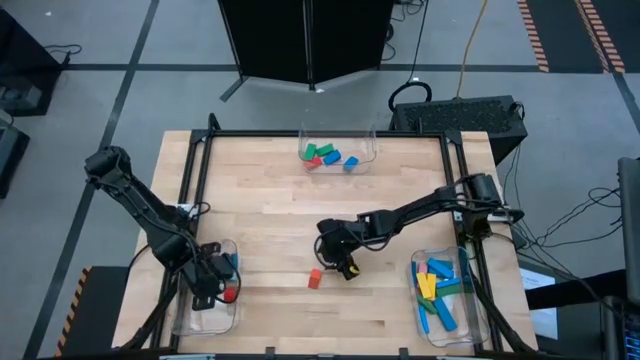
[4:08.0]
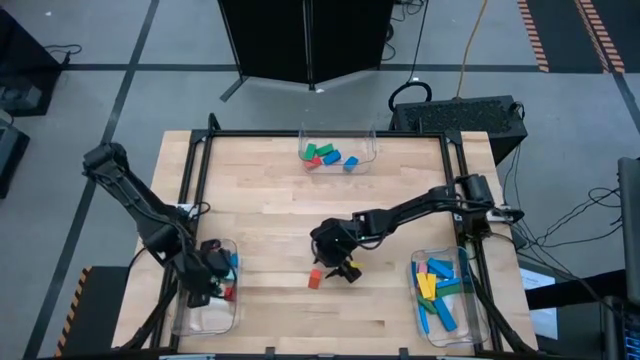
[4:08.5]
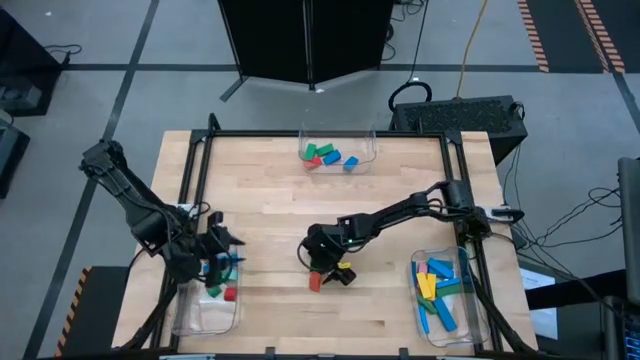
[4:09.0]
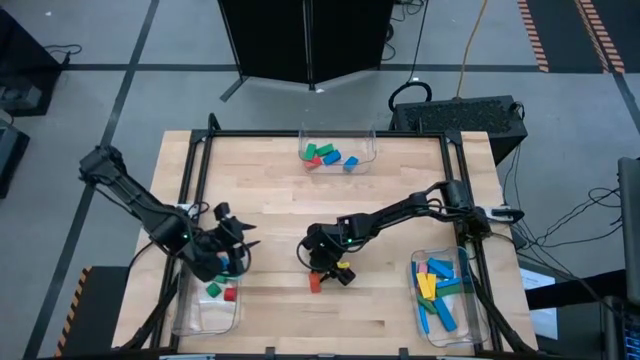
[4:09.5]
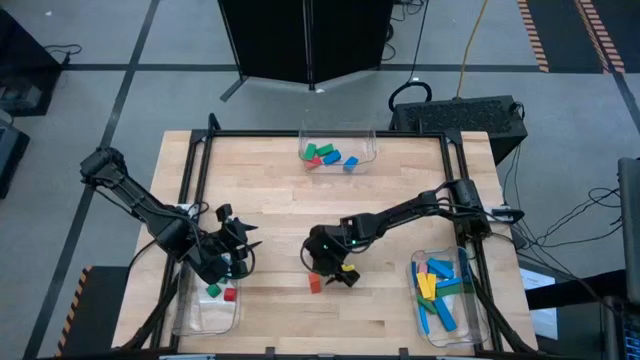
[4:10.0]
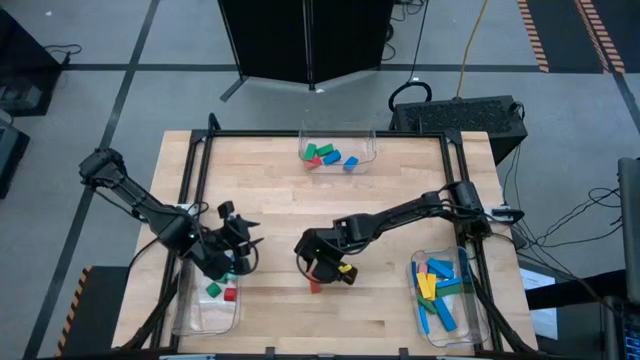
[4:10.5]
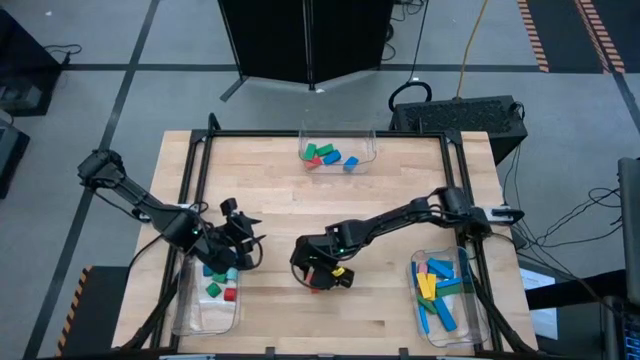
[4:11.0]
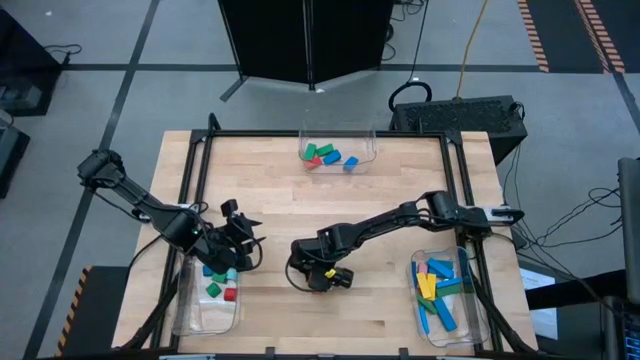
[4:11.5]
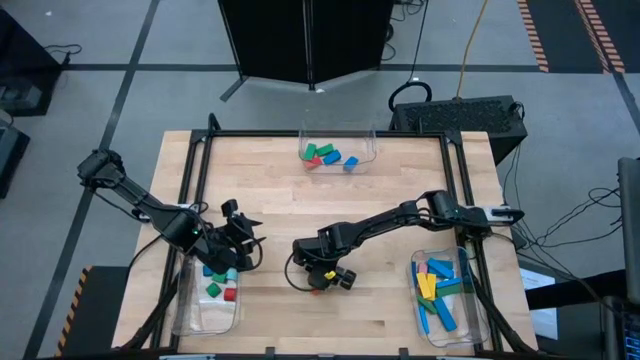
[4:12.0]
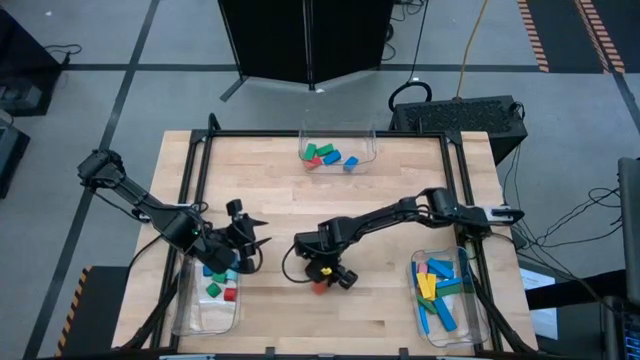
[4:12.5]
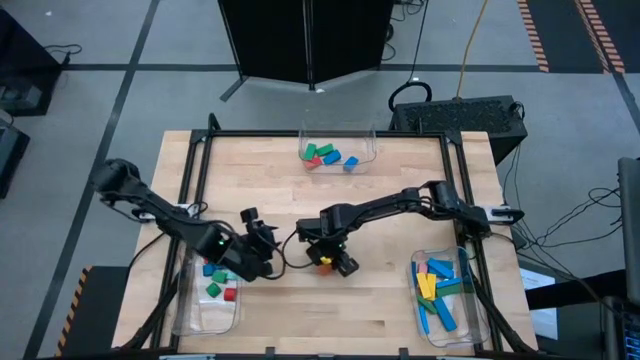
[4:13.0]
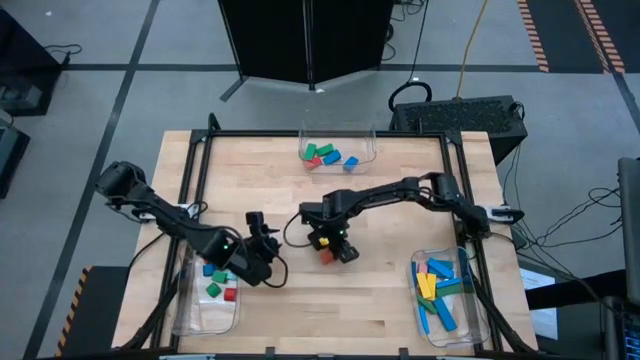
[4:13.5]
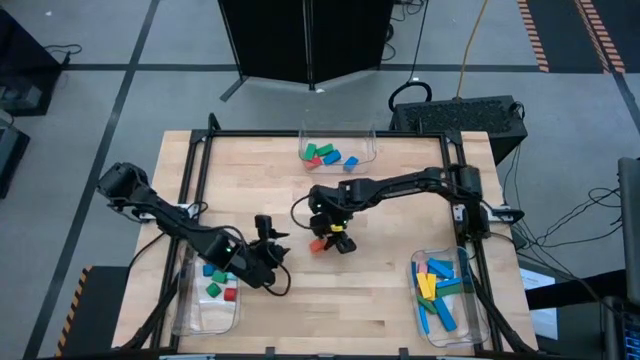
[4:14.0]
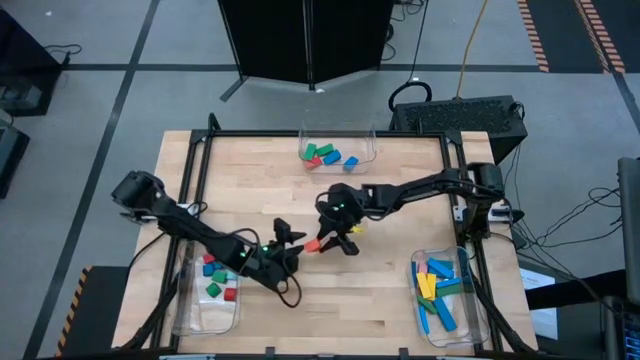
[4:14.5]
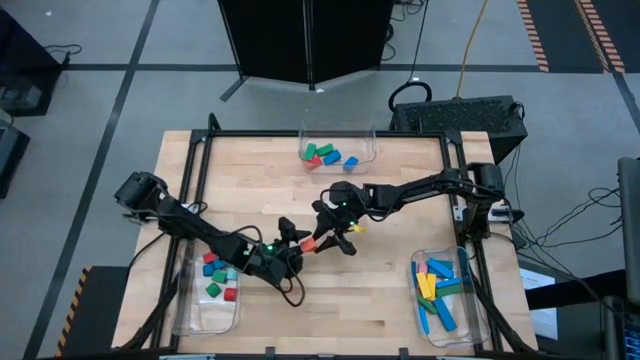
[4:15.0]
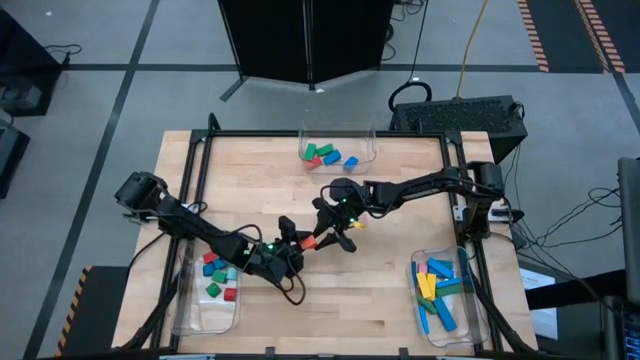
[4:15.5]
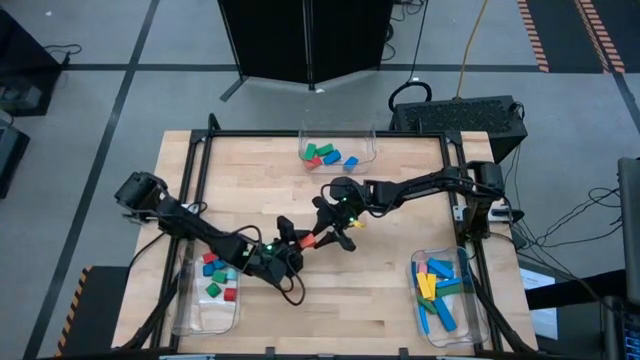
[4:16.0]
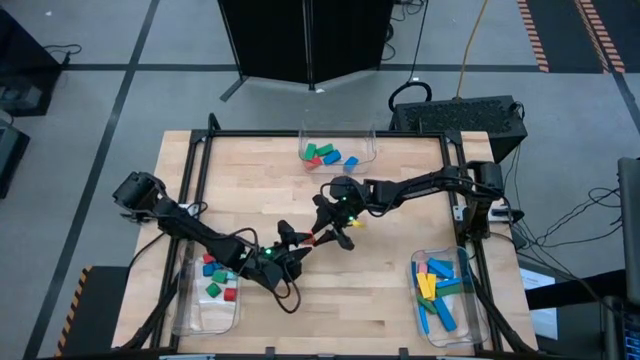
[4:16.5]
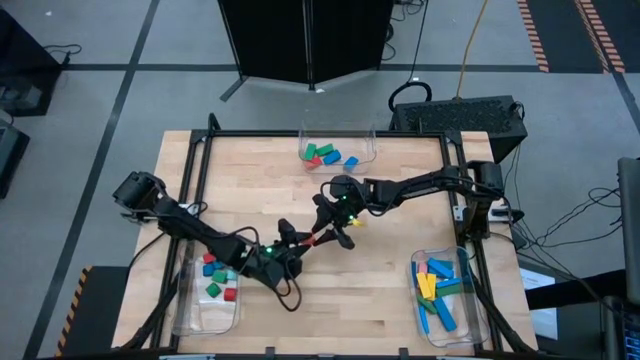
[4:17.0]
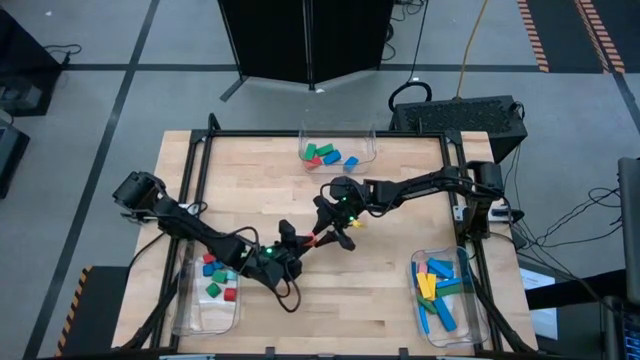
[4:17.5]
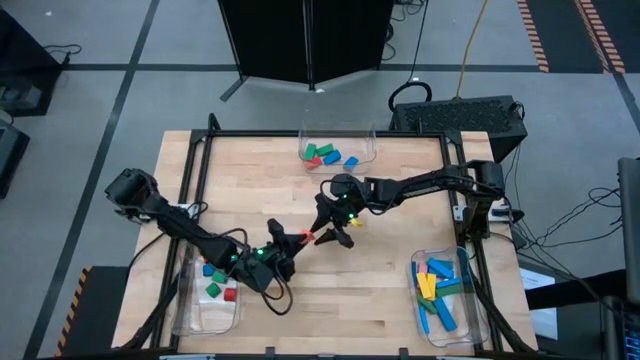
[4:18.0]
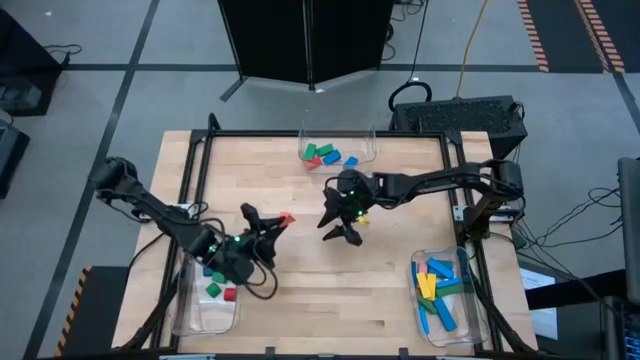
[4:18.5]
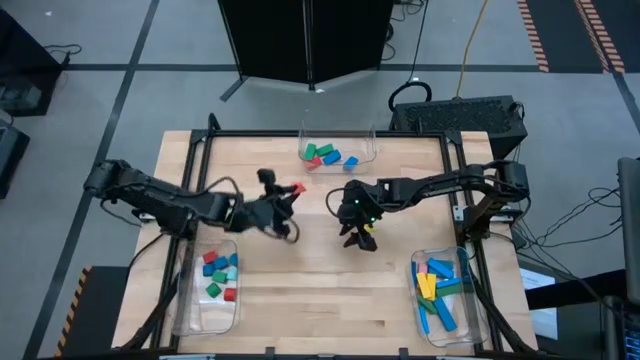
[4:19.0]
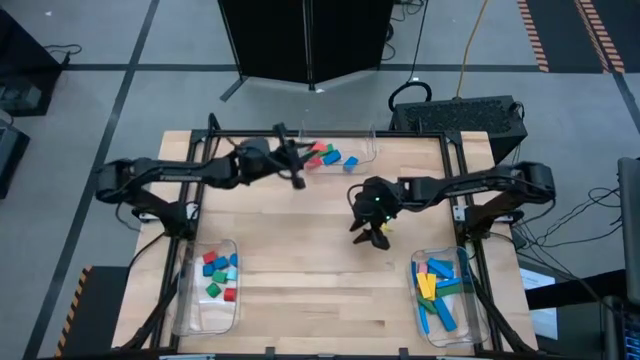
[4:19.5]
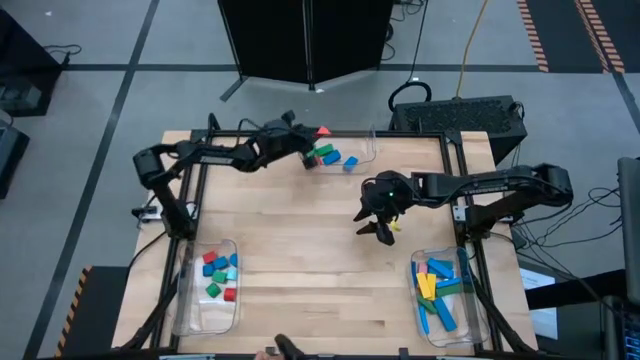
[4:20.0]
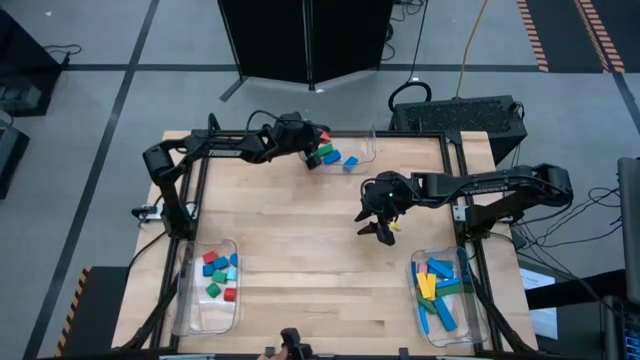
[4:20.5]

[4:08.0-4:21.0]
Task: Sort blocks by size
Put the orange triangle block into the top transparent bin

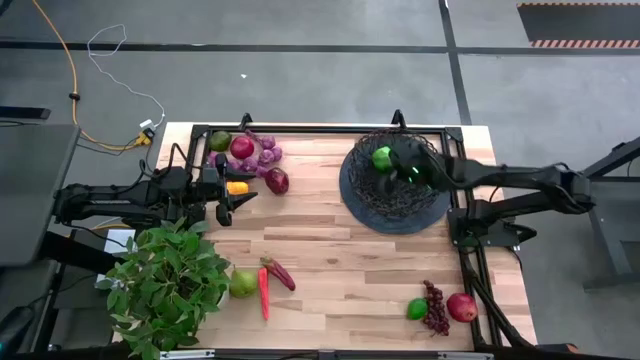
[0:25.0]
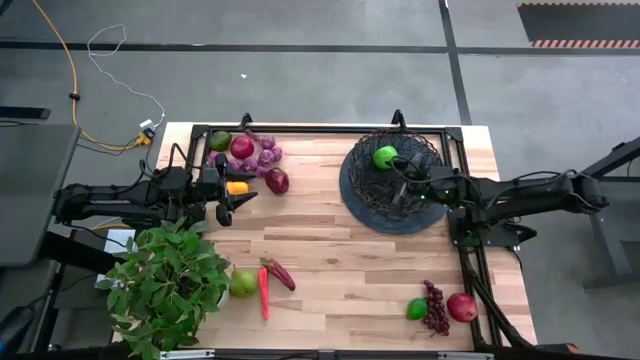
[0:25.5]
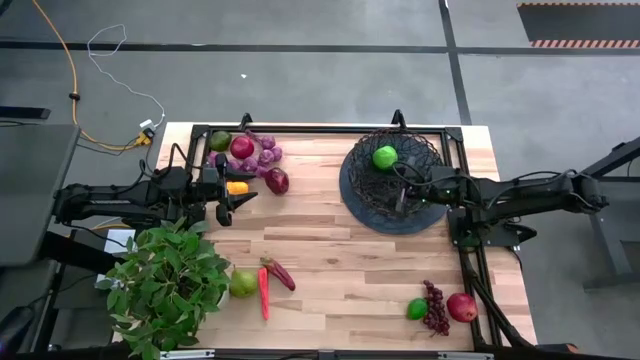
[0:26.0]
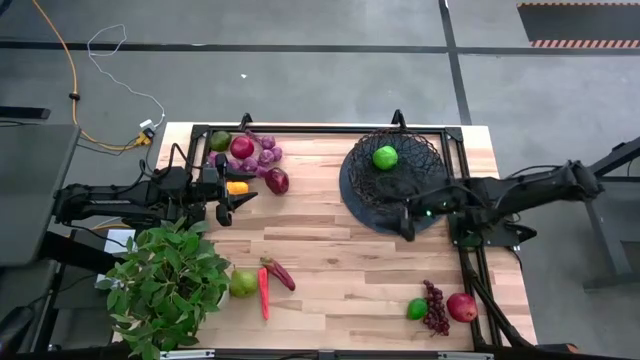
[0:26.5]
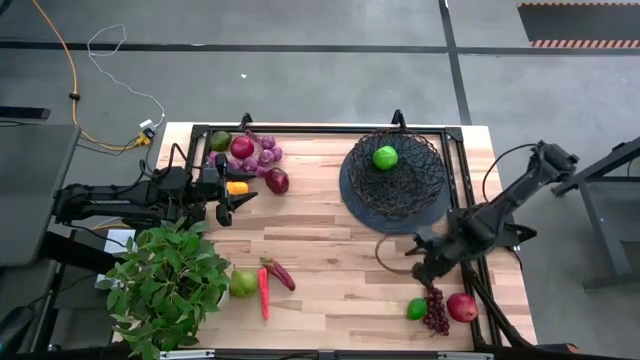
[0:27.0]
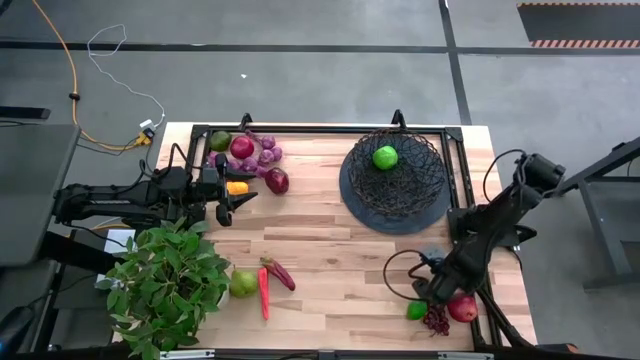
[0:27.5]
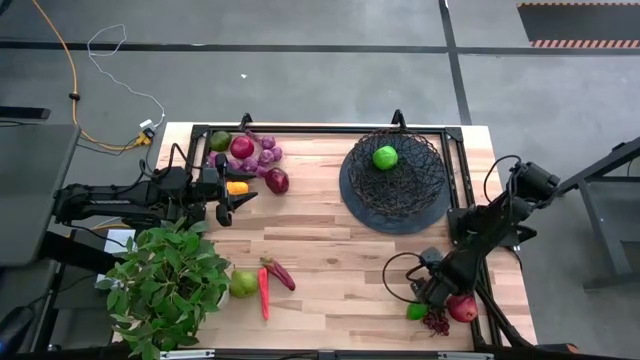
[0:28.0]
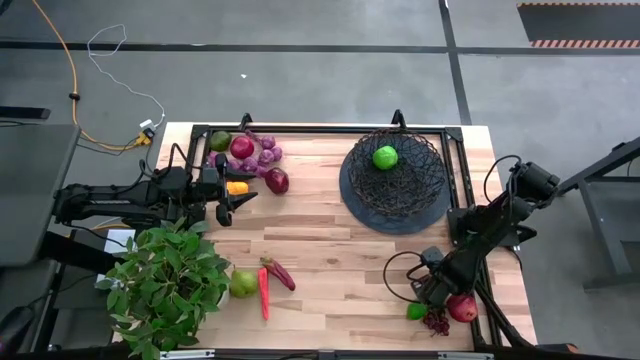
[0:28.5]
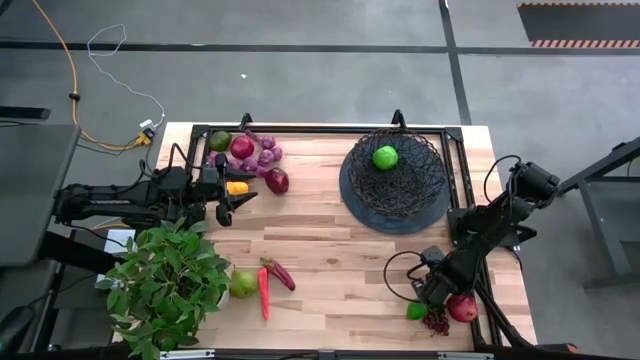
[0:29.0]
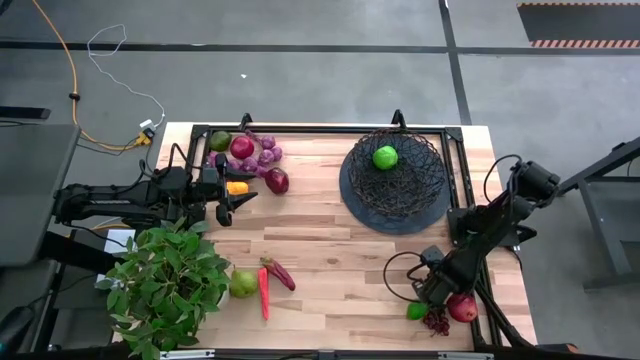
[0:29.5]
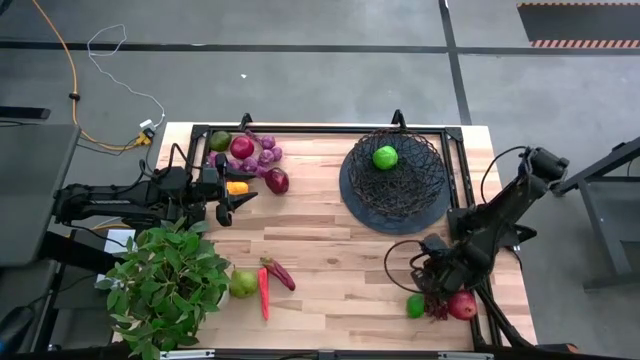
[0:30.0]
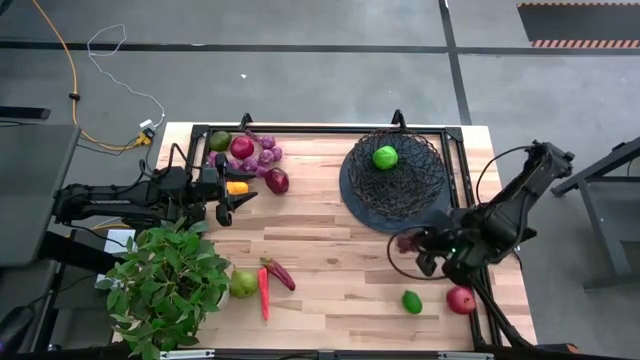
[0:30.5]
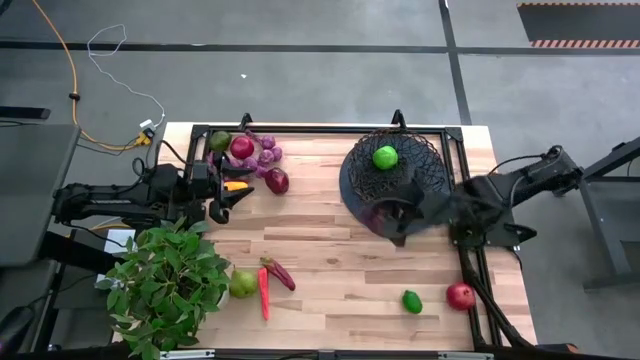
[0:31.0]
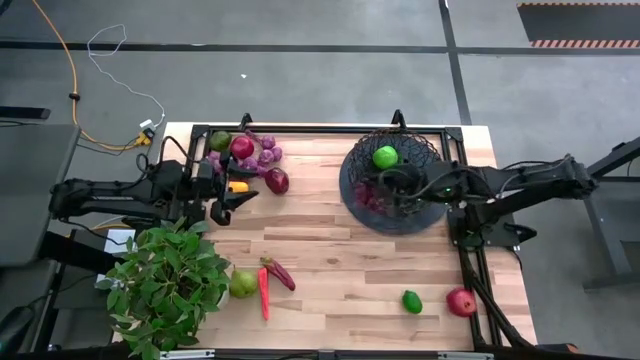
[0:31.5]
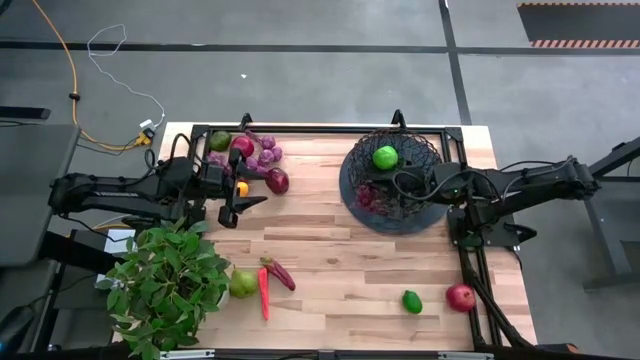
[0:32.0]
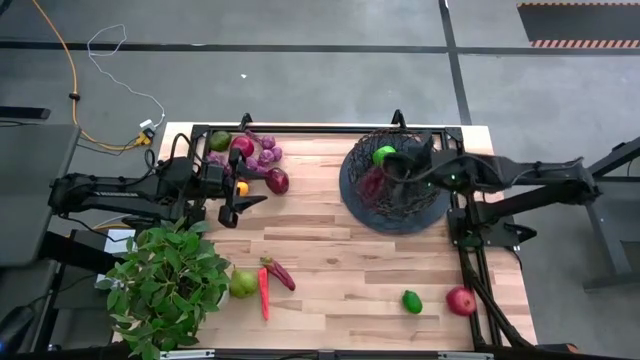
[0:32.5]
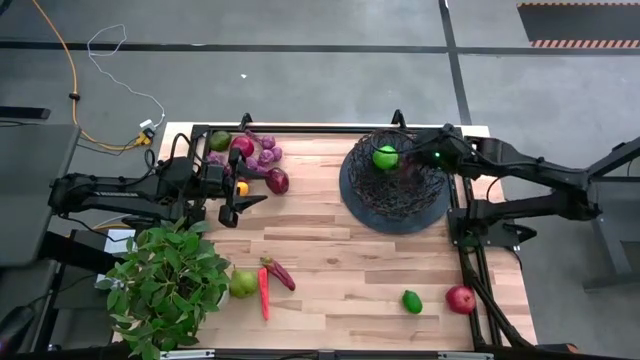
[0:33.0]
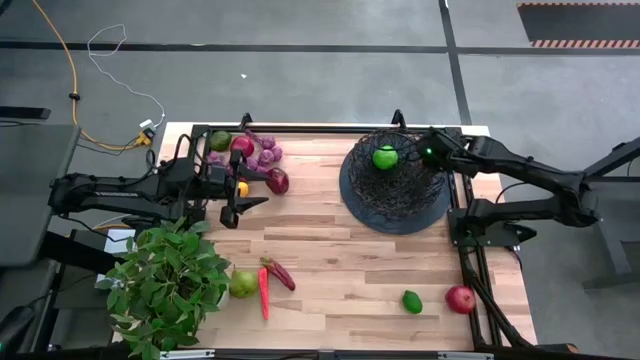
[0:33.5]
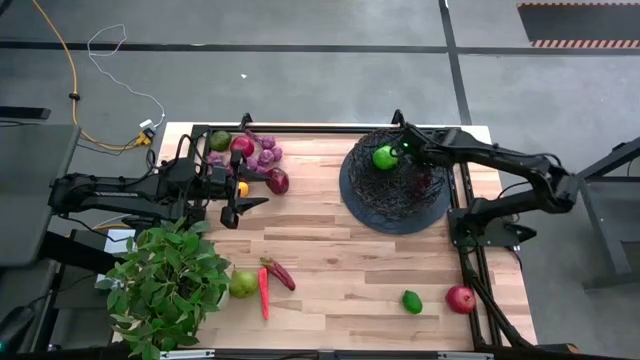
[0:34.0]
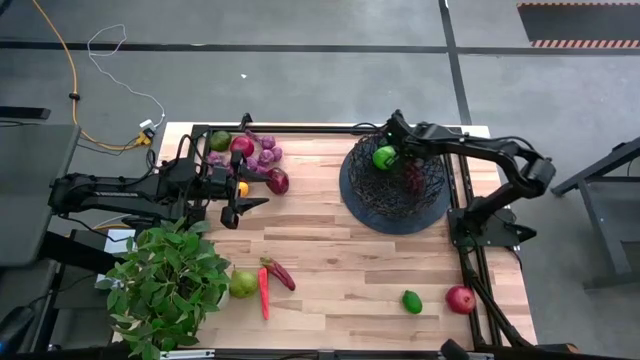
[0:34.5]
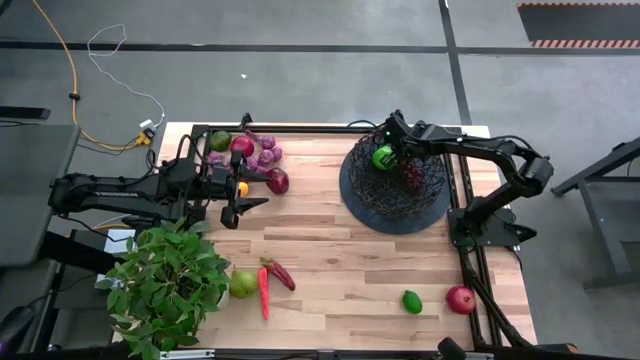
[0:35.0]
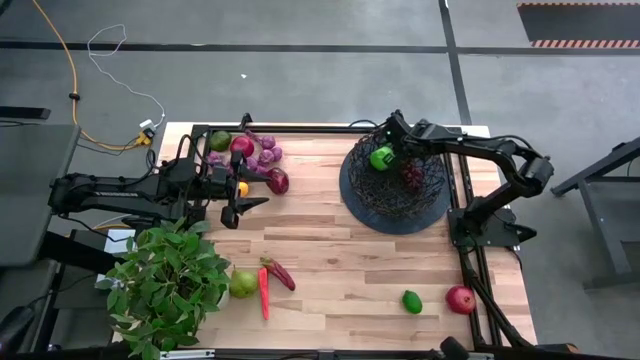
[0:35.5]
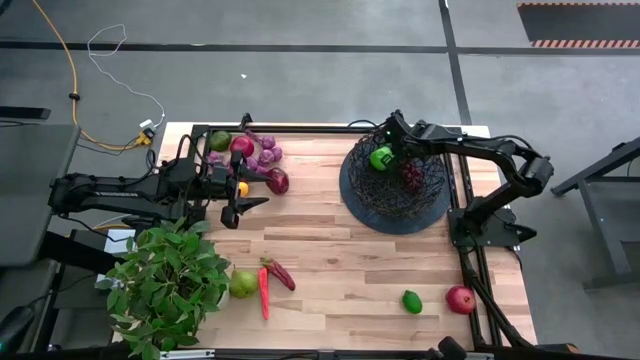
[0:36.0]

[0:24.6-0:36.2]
Task: Build produce basket
Put the red grapes into the black wire basket
